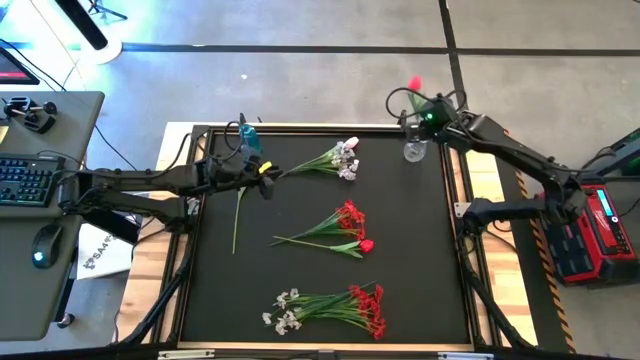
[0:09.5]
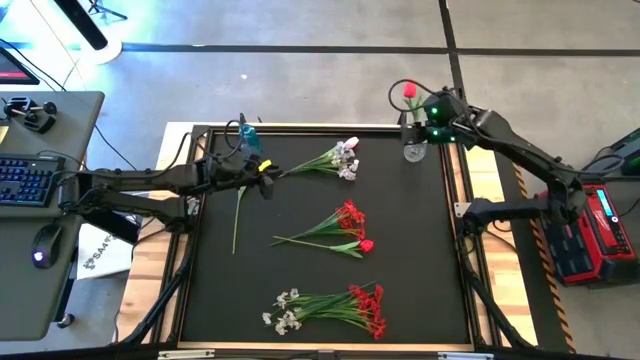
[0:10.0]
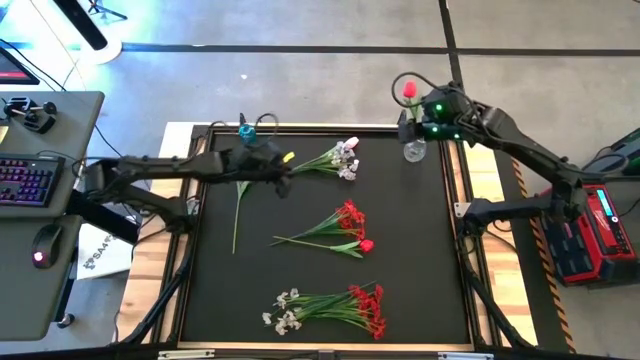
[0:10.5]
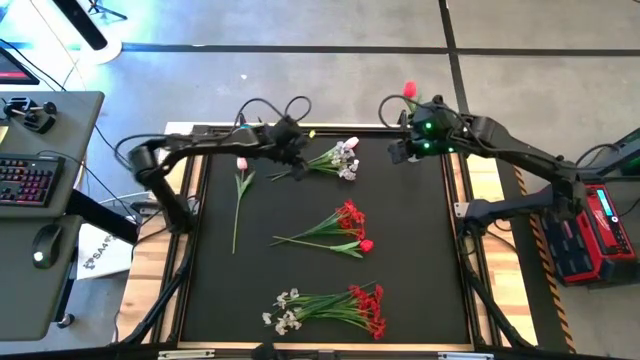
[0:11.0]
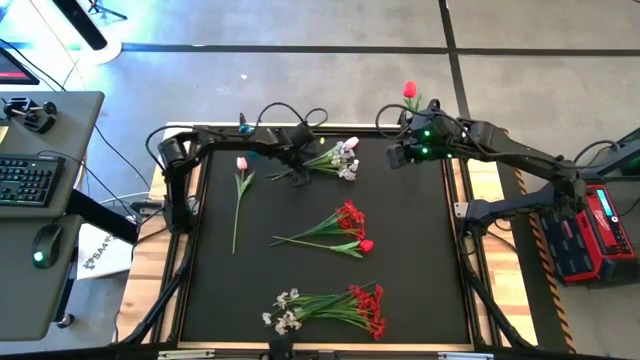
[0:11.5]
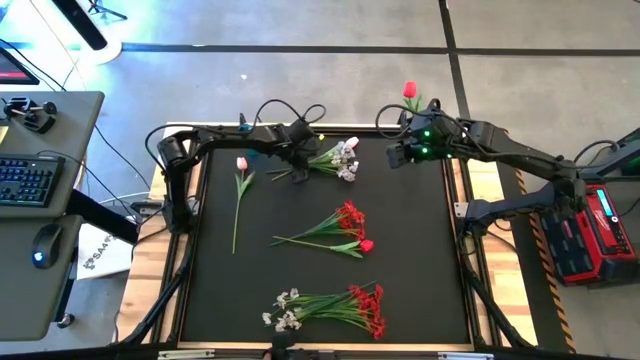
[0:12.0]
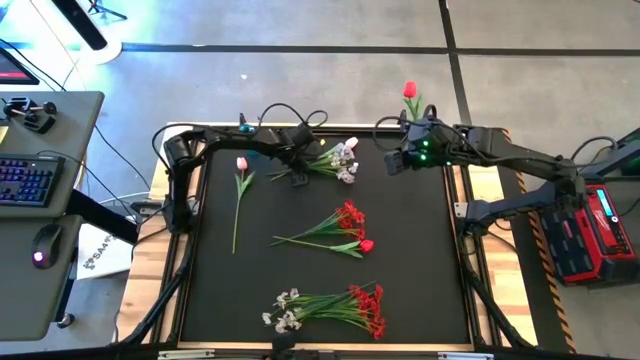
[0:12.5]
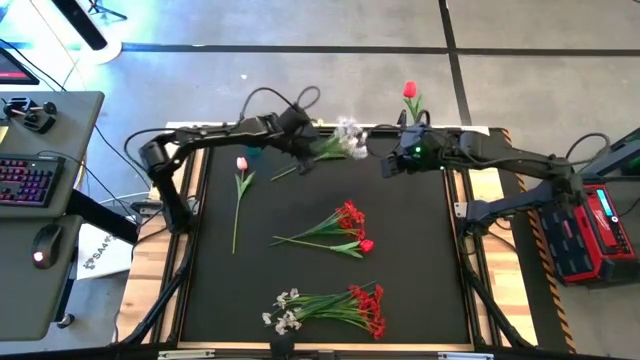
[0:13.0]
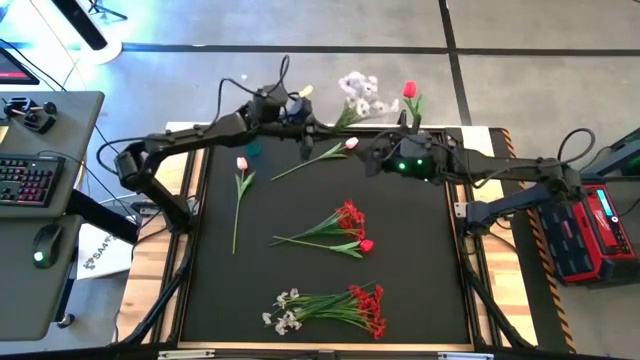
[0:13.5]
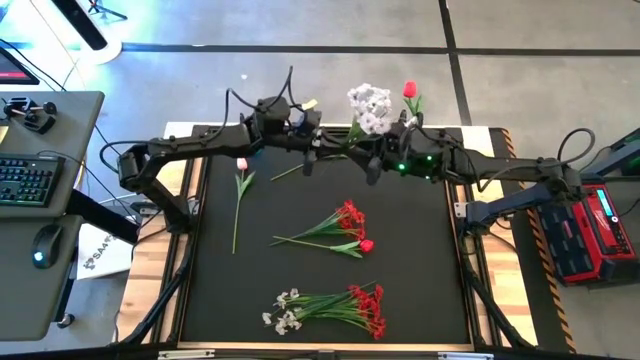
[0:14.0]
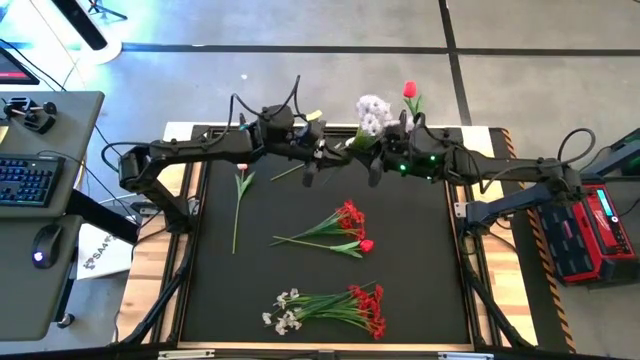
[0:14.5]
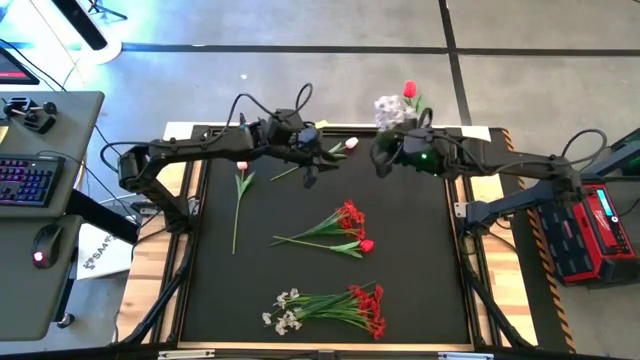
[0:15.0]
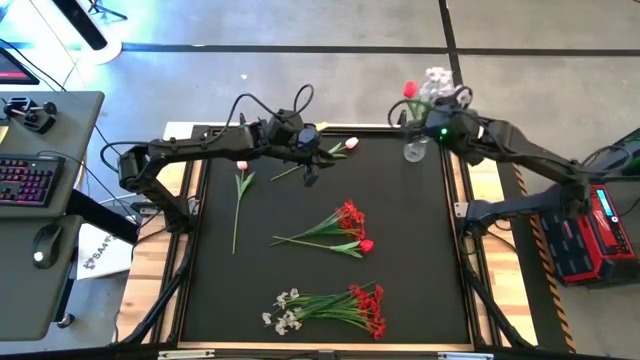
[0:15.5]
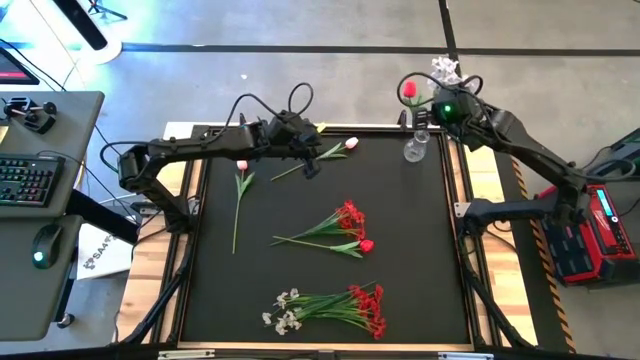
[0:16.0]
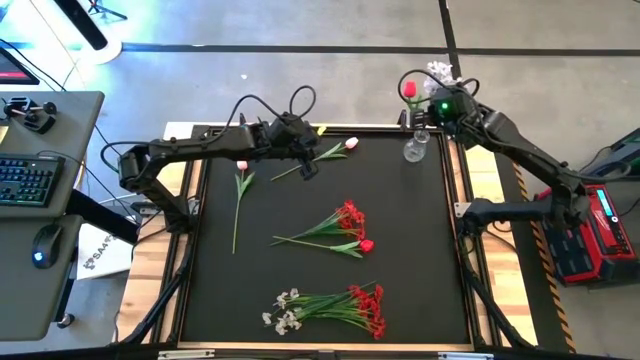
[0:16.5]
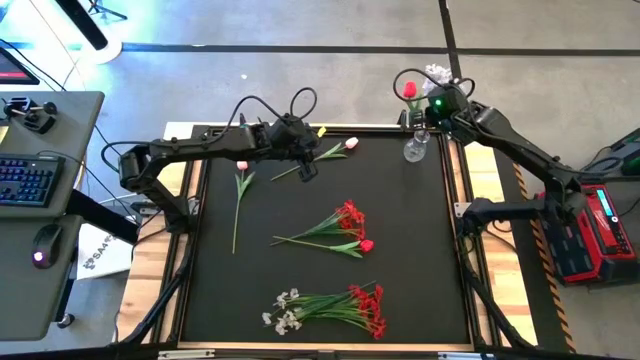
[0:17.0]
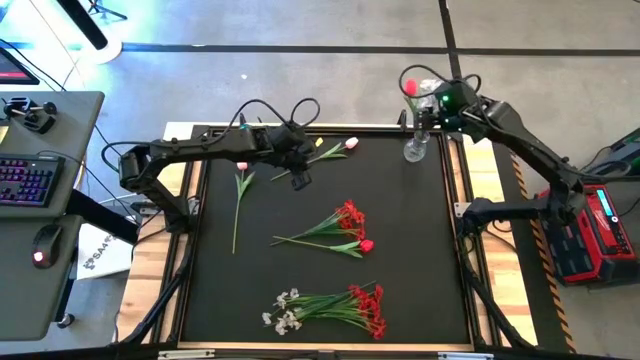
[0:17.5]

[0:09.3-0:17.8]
Task: Sort flowers into vase by color
Put the top white flowers into the transparent vase

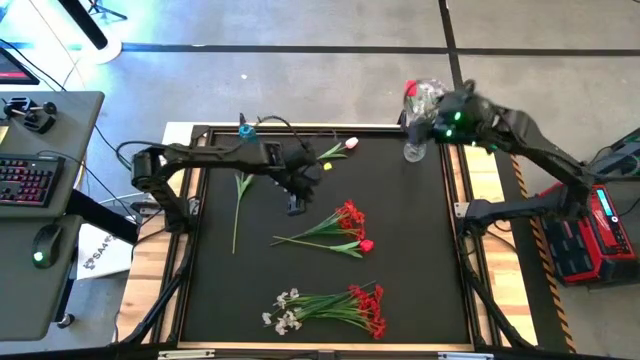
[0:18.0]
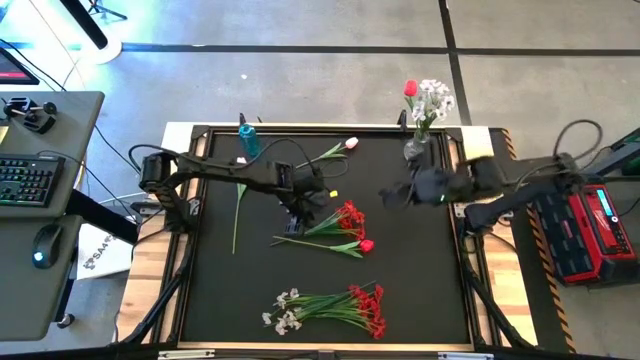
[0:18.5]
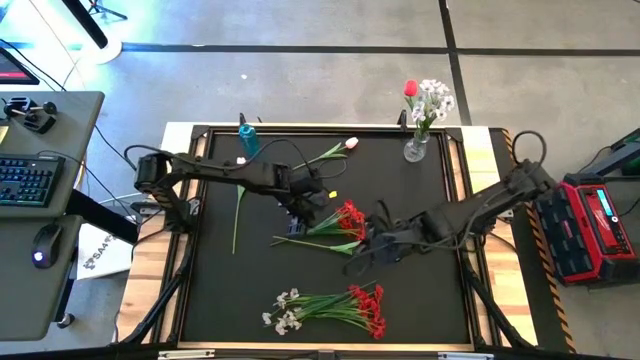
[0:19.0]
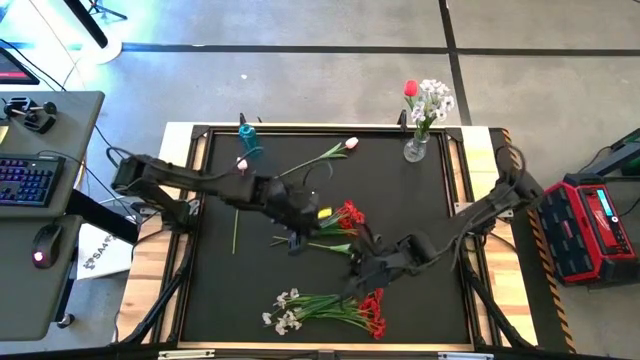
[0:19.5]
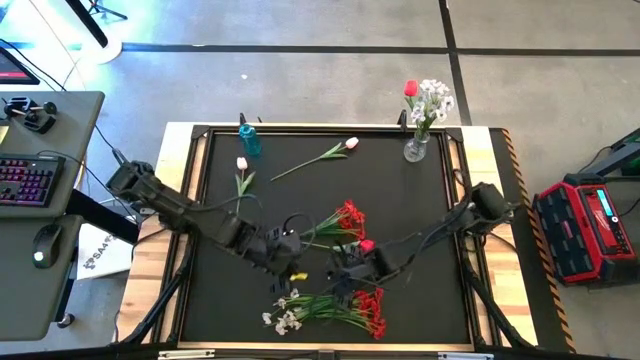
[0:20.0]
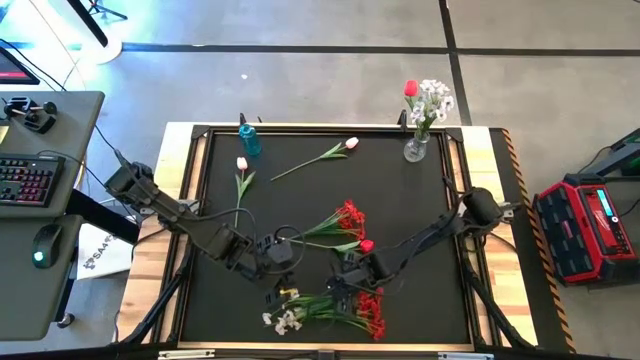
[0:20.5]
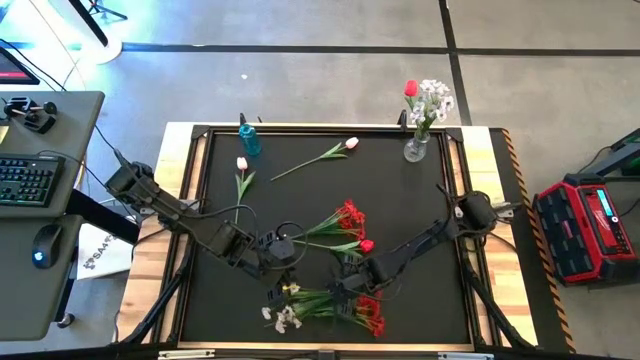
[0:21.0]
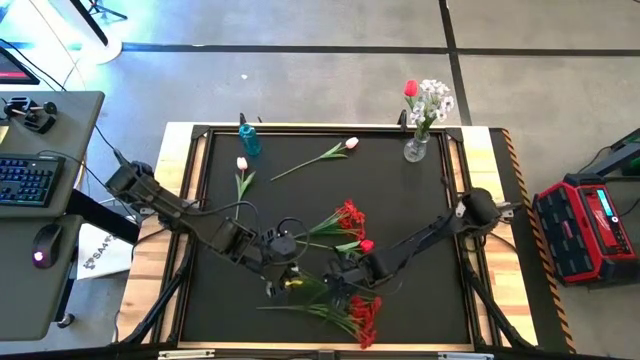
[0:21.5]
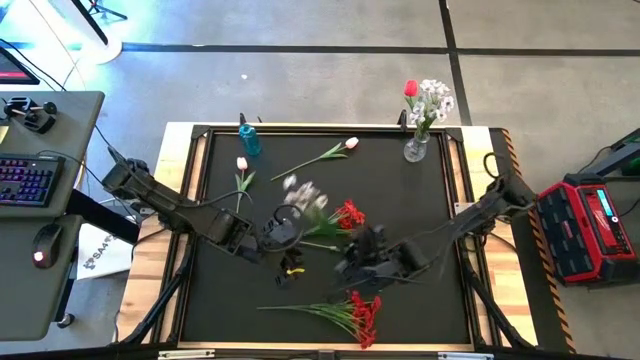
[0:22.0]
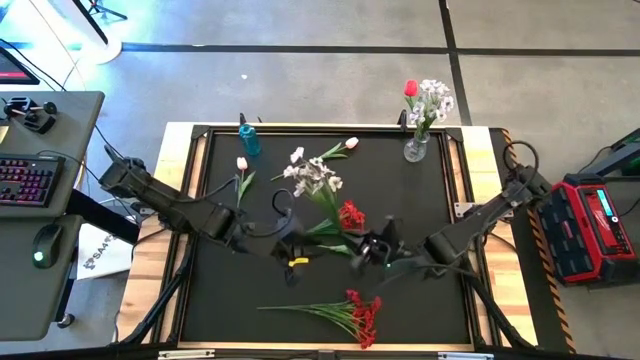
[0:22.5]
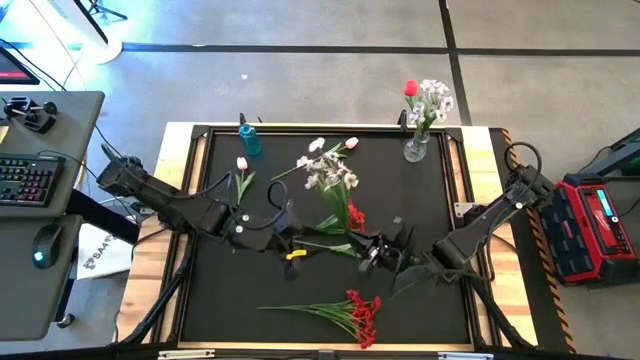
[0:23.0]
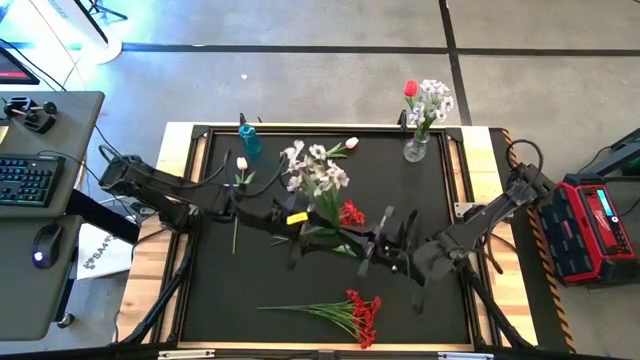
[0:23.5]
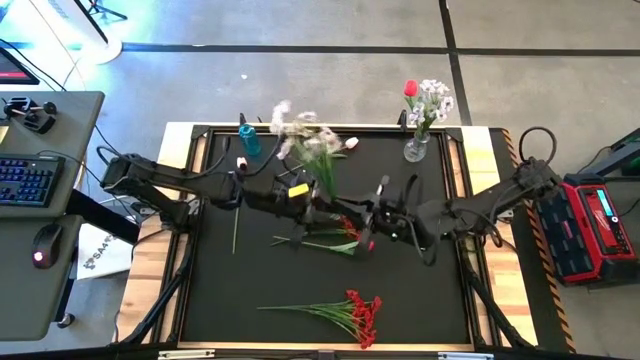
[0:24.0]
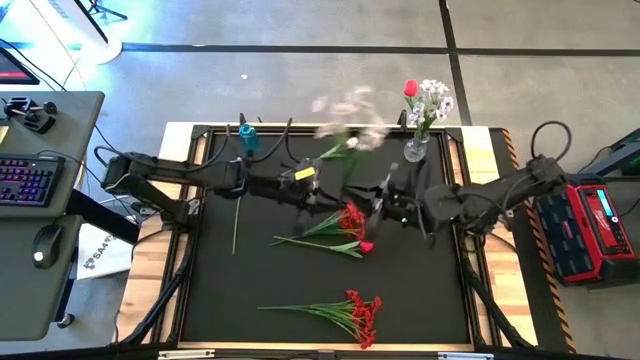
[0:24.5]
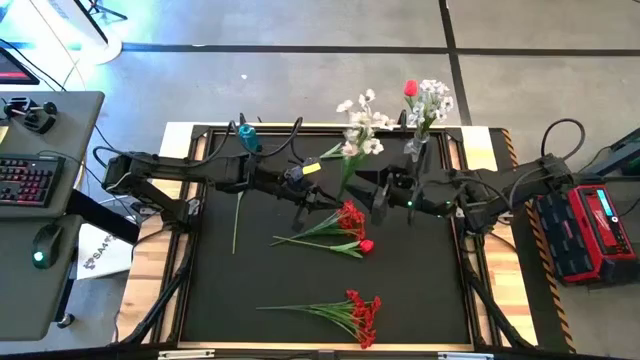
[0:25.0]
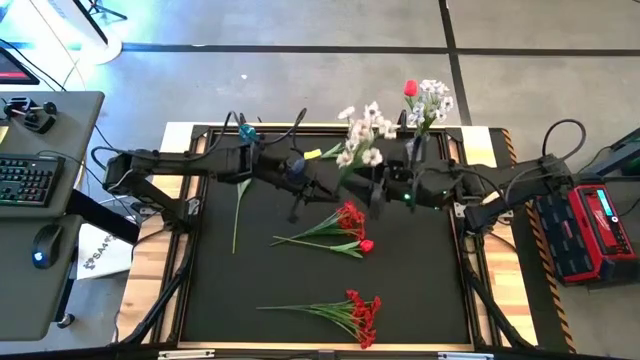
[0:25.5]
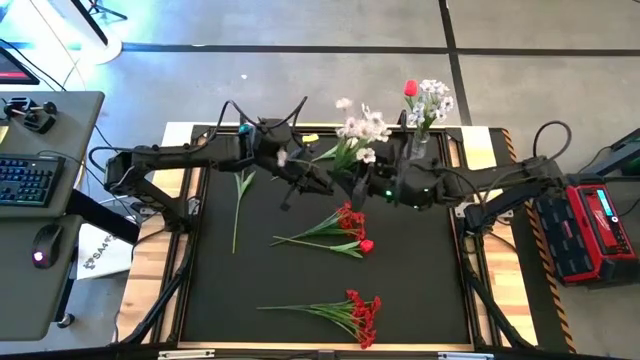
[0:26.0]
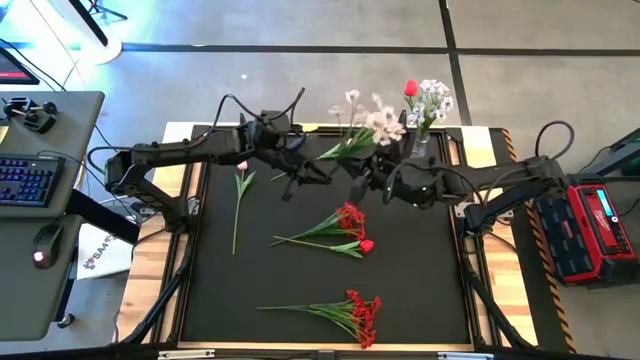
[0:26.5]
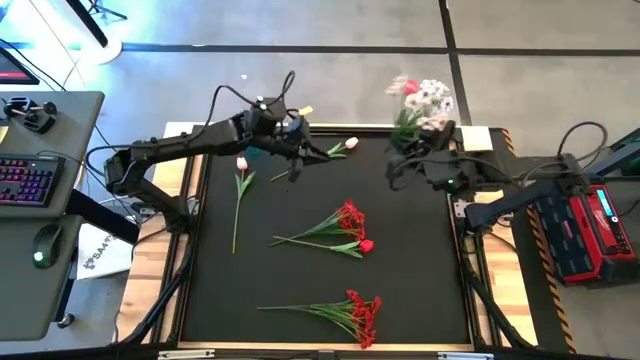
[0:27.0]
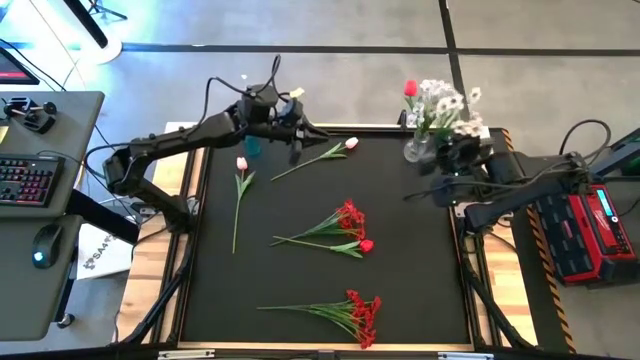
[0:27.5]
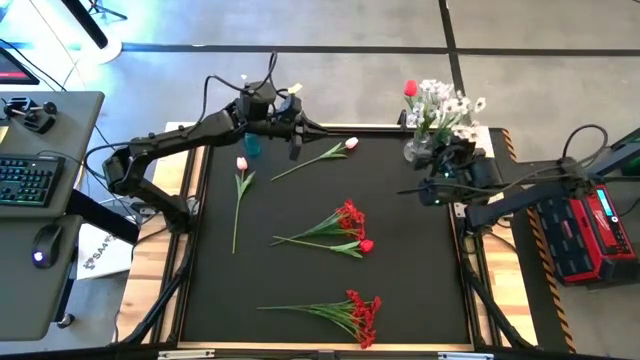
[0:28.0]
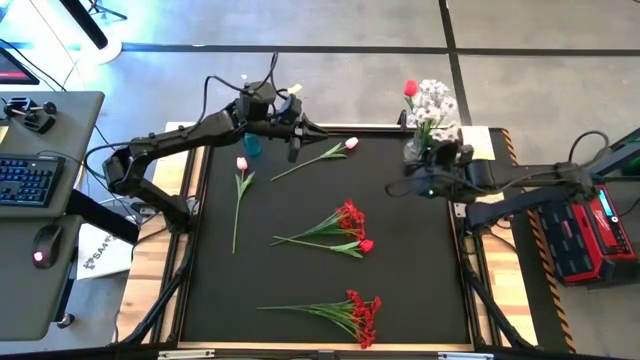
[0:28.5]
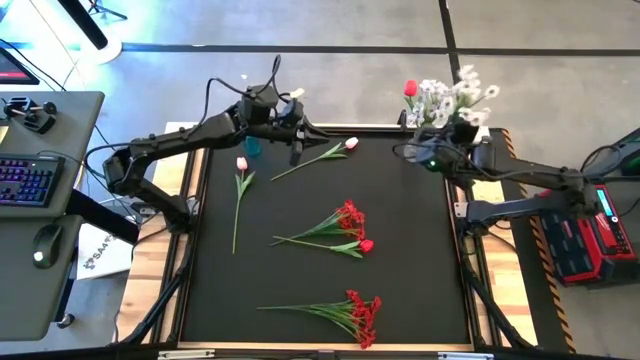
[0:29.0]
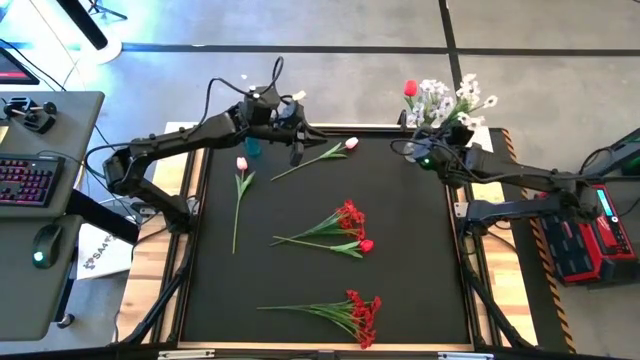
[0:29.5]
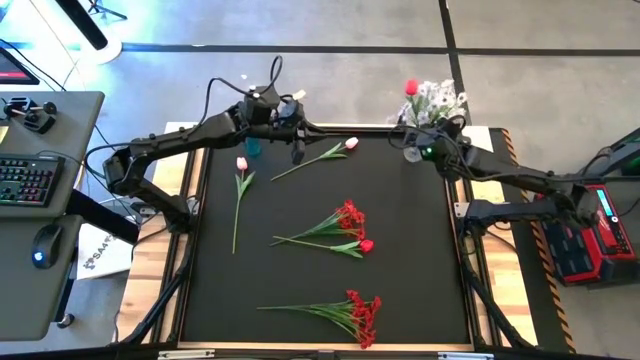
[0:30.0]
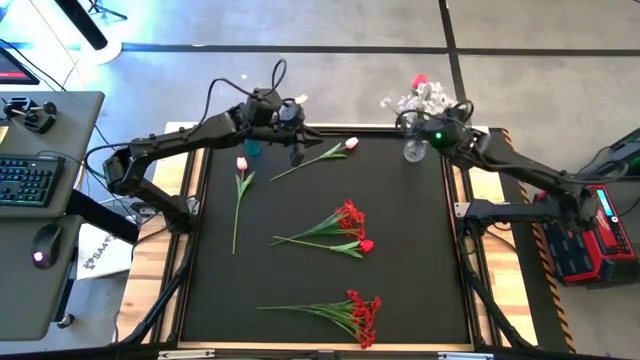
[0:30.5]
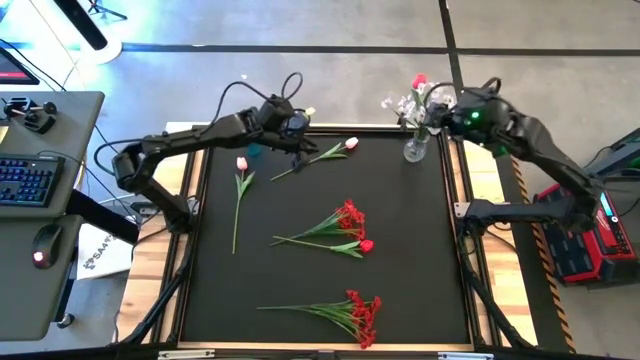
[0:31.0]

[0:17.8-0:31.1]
Put the white flowers into the transparent vase
